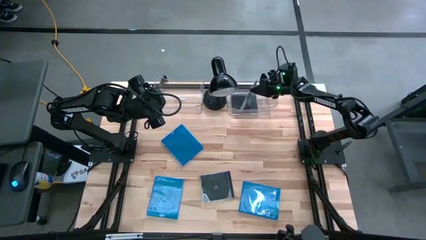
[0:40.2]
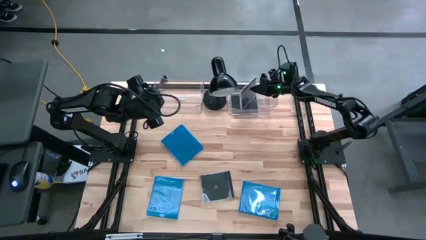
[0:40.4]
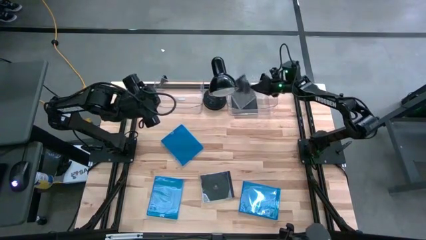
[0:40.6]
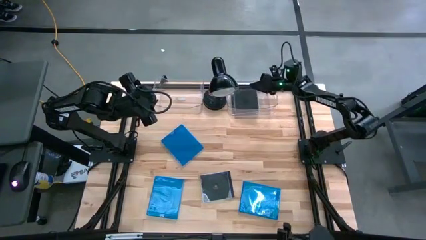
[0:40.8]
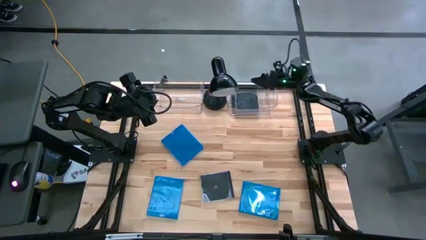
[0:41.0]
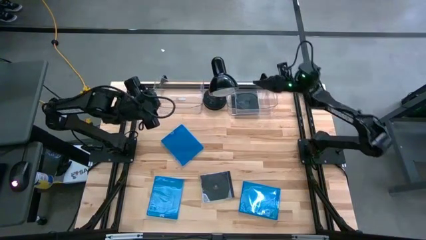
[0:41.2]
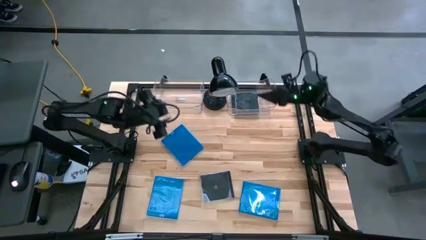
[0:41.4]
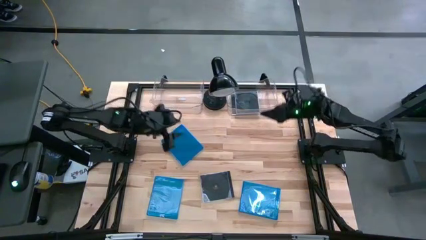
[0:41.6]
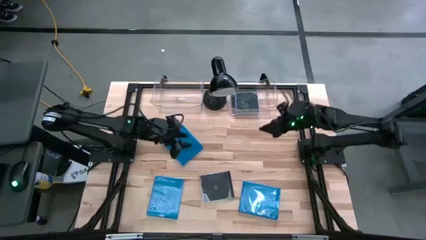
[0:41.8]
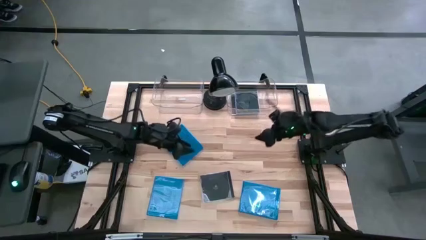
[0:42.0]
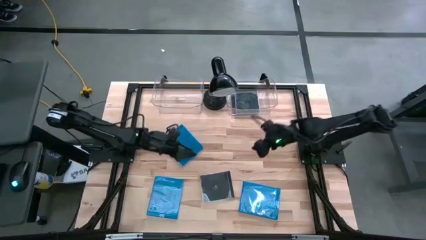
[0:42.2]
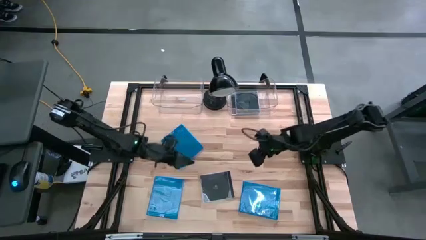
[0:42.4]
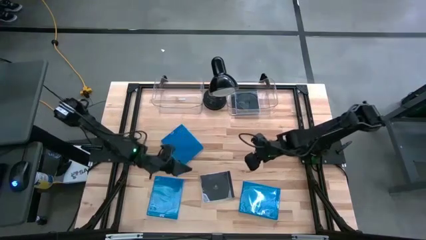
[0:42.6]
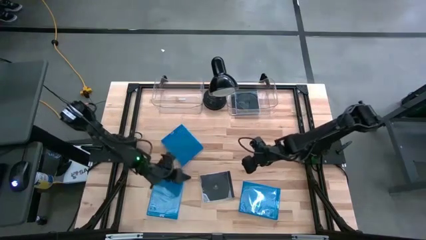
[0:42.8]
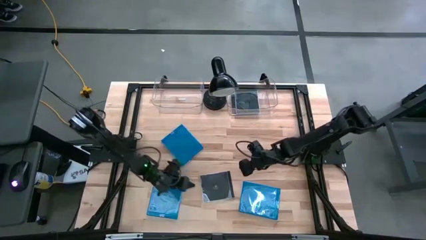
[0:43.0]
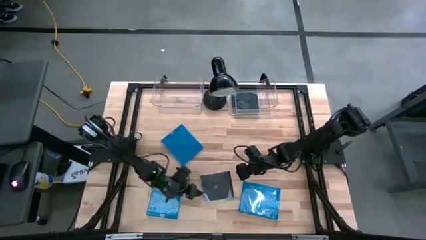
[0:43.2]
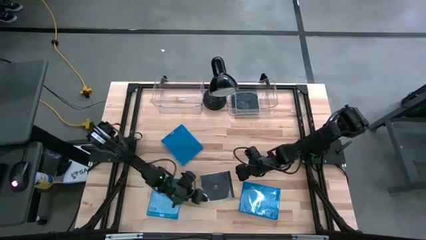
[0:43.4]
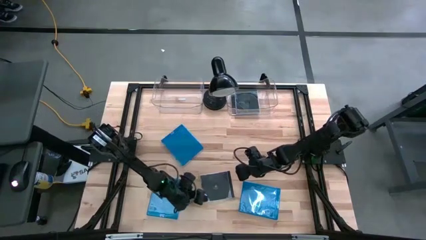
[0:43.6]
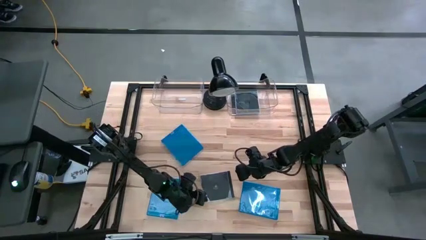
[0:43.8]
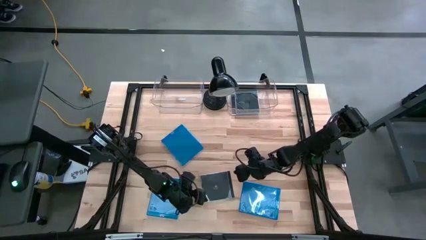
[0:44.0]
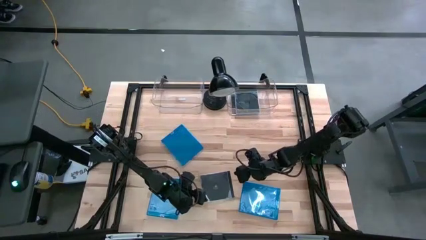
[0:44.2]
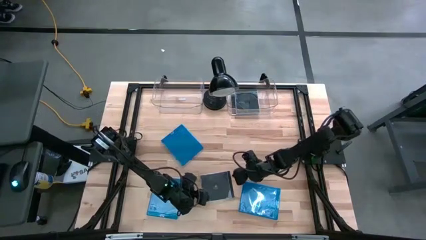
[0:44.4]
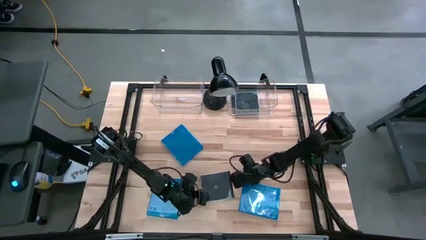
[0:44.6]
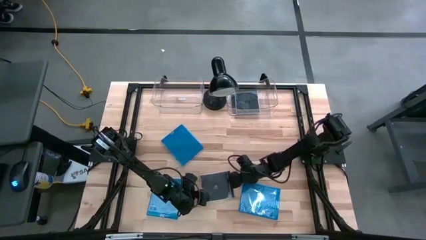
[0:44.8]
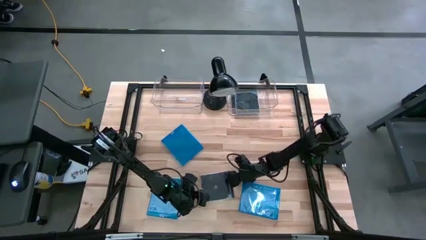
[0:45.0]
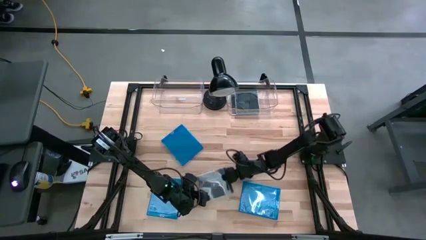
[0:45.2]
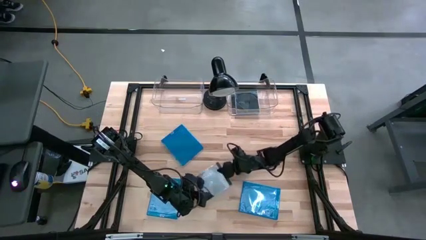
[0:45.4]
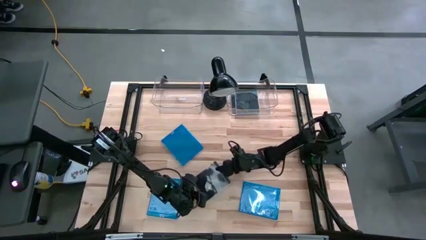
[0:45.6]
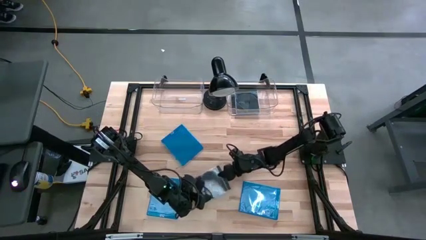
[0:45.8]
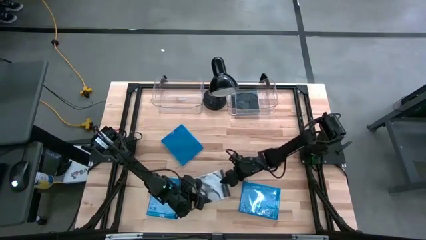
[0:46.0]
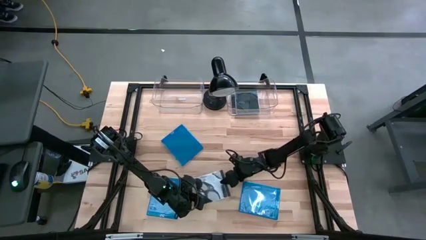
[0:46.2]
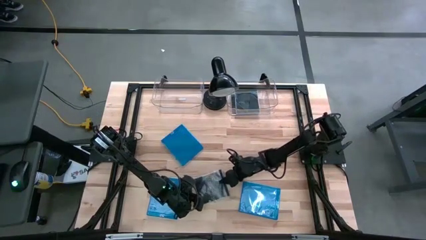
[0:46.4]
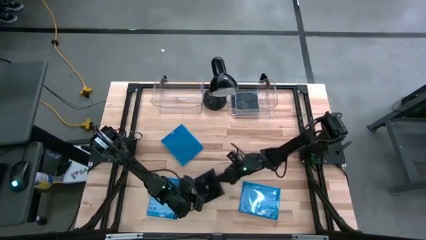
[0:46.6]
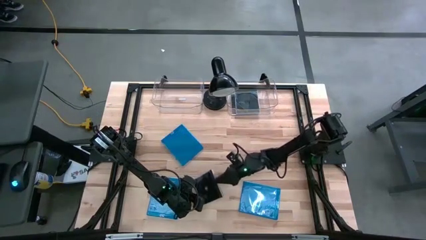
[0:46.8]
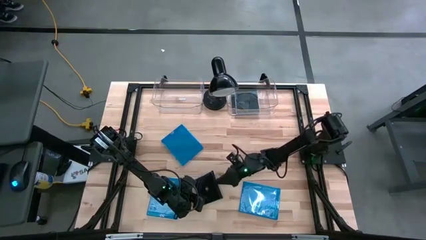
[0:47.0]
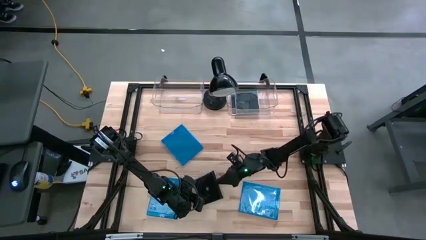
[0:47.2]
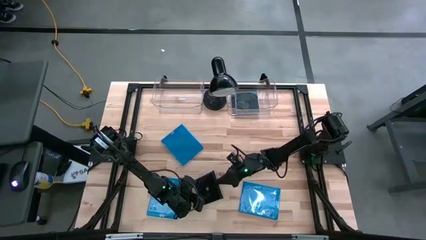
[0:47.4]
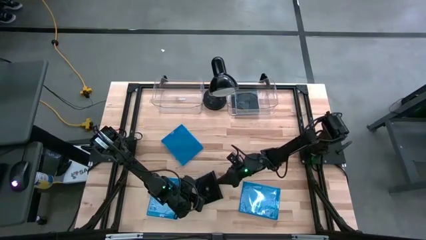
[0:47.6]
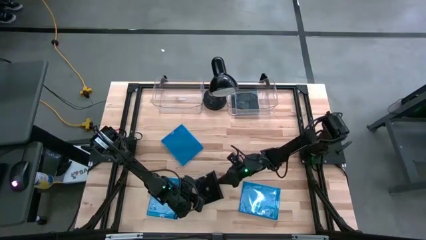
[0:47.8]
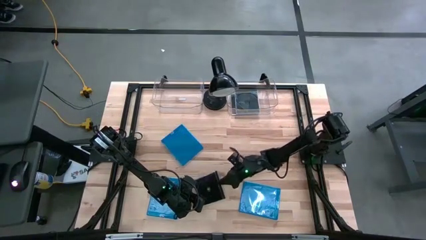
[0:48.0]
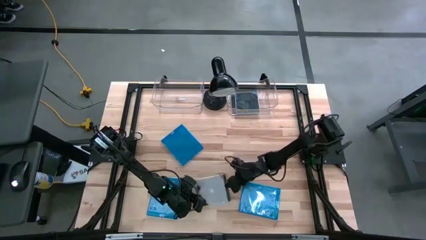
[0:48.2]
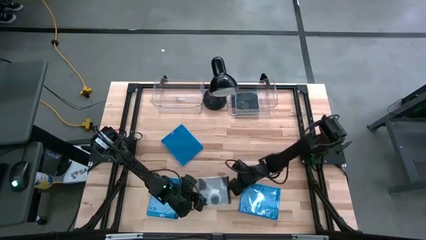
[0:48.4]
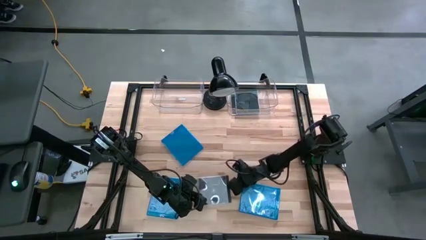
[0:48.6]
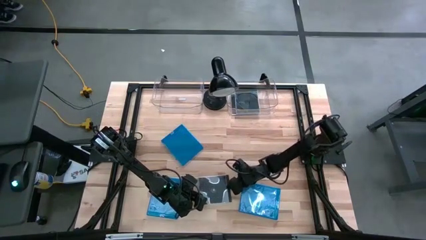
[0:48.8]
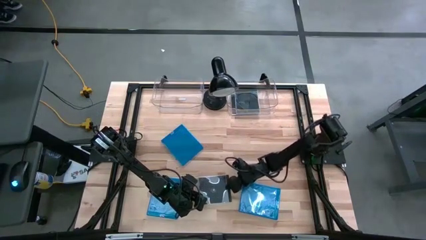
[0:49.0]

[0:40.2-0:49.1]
Task: Pick & place jewel cases by type
Put the black CD case into the right transparent bin

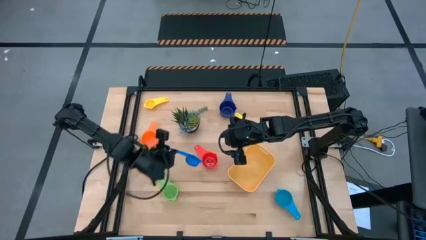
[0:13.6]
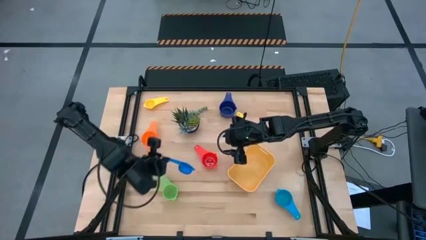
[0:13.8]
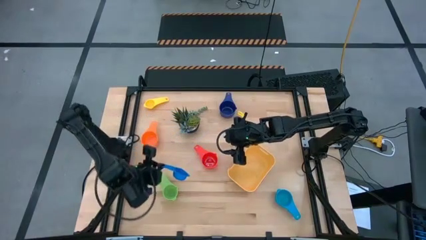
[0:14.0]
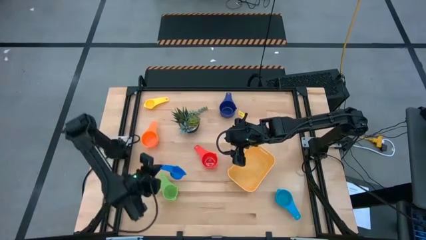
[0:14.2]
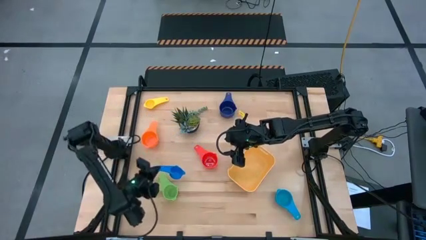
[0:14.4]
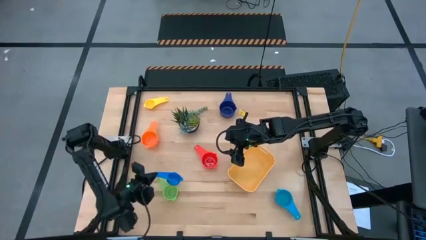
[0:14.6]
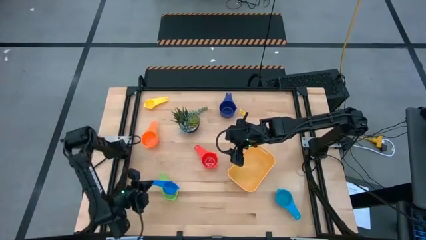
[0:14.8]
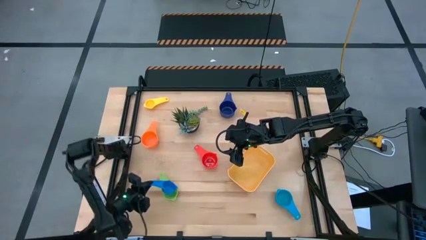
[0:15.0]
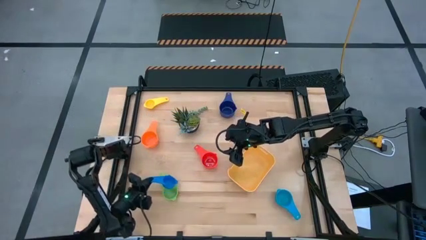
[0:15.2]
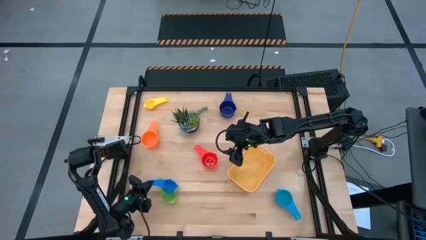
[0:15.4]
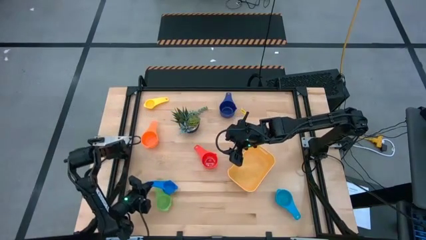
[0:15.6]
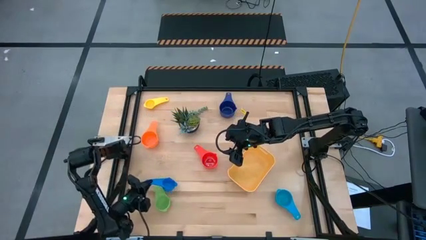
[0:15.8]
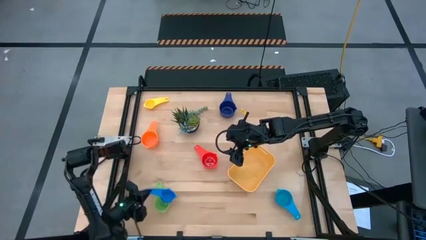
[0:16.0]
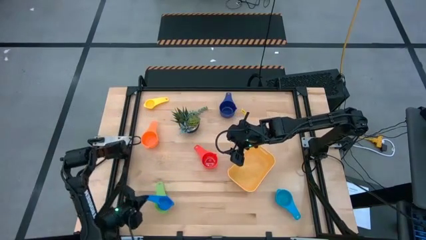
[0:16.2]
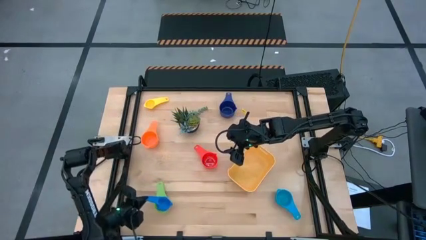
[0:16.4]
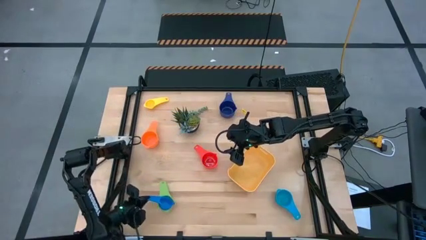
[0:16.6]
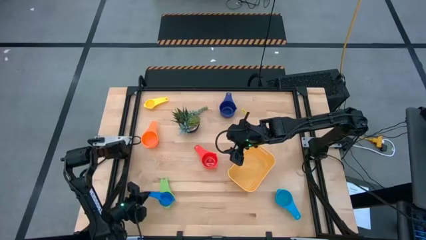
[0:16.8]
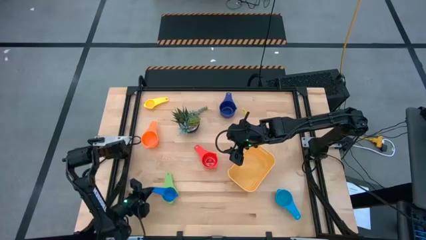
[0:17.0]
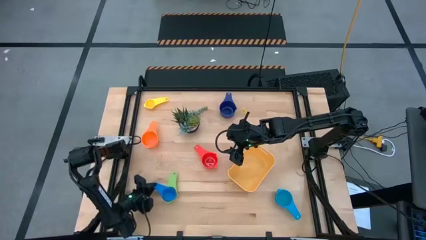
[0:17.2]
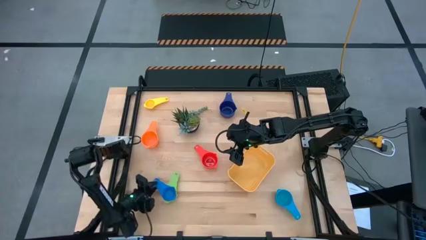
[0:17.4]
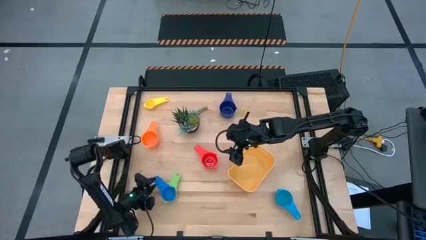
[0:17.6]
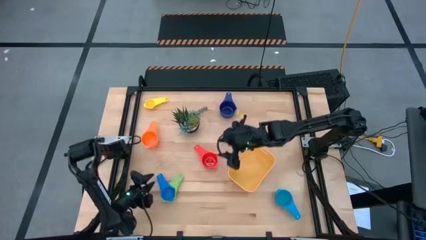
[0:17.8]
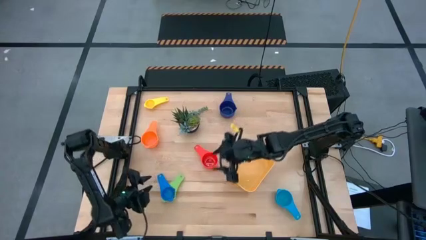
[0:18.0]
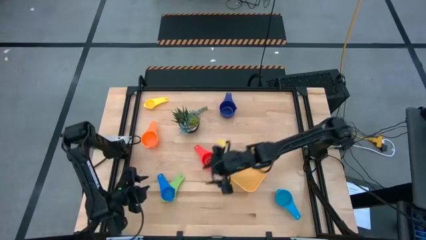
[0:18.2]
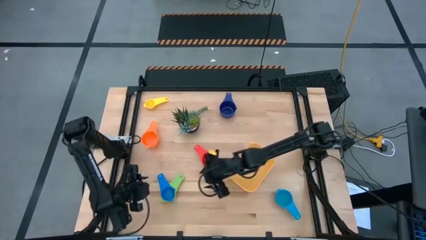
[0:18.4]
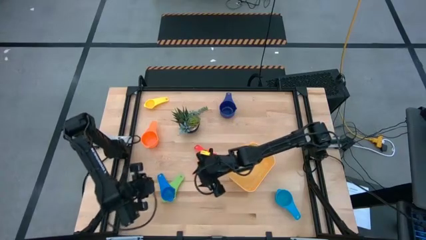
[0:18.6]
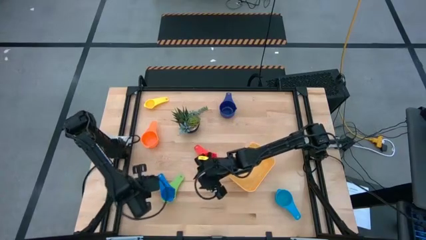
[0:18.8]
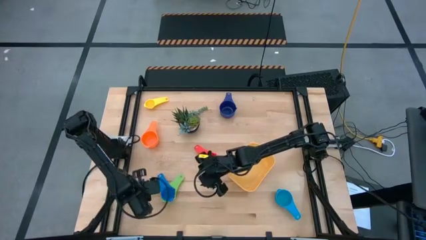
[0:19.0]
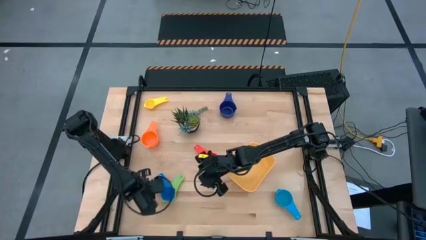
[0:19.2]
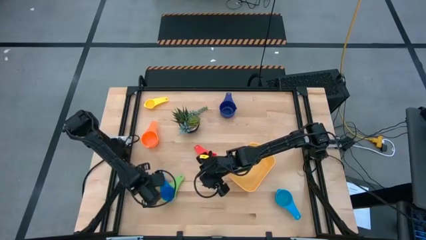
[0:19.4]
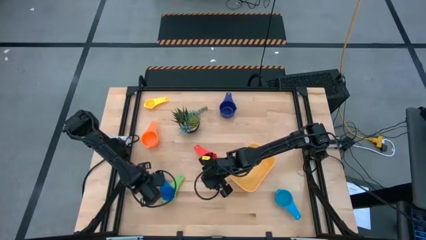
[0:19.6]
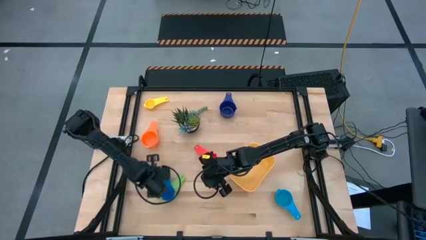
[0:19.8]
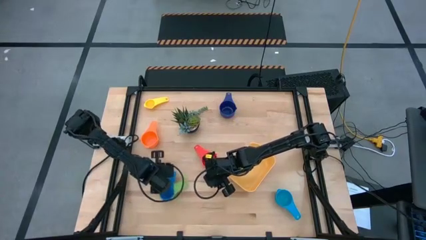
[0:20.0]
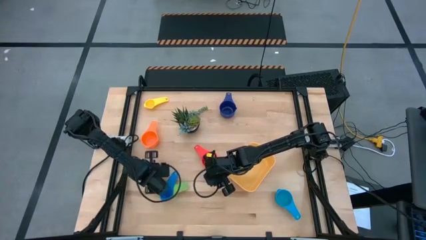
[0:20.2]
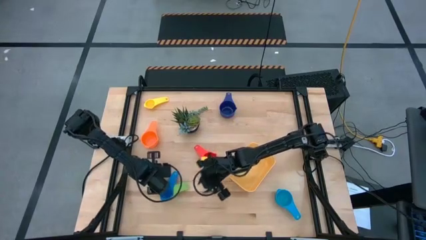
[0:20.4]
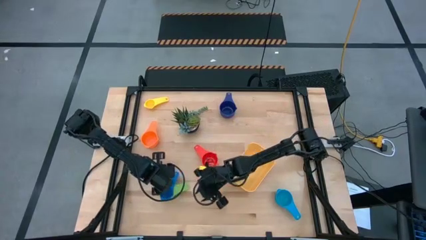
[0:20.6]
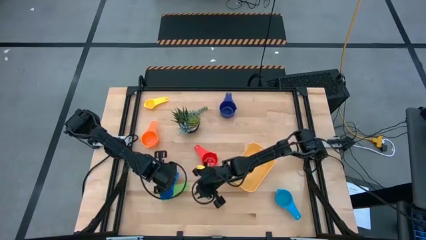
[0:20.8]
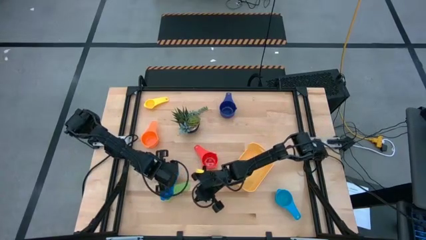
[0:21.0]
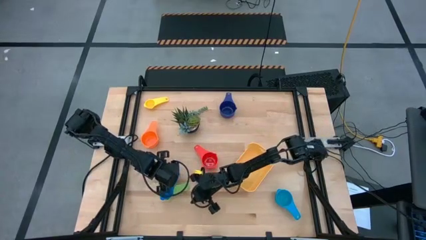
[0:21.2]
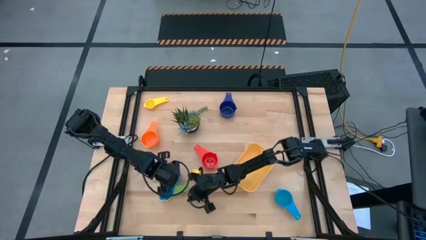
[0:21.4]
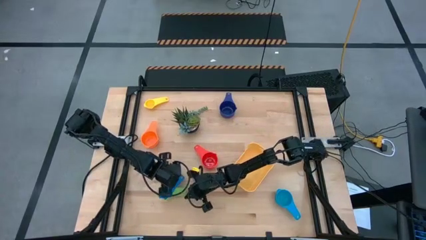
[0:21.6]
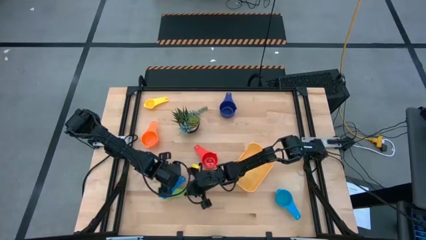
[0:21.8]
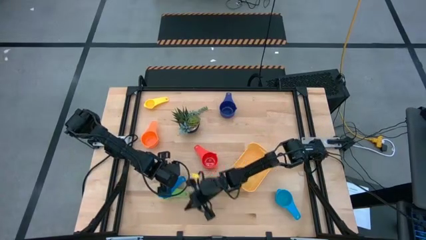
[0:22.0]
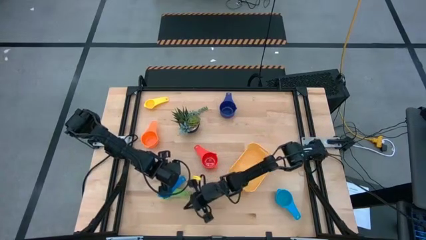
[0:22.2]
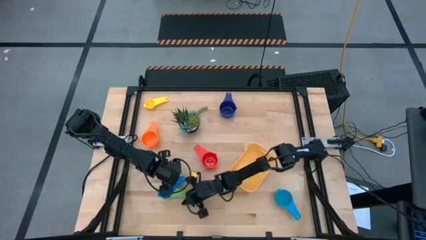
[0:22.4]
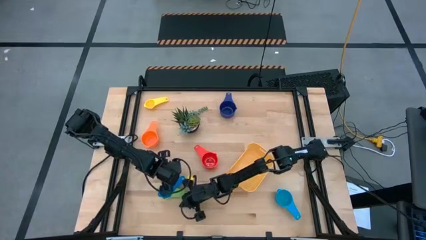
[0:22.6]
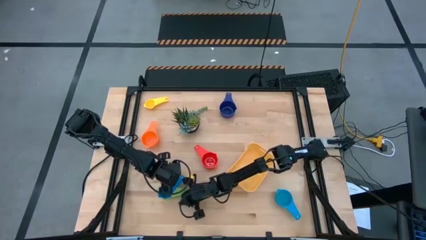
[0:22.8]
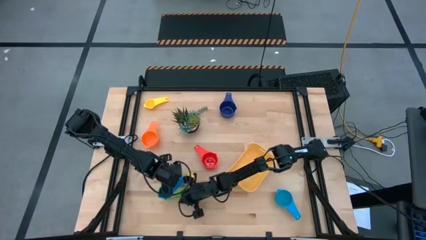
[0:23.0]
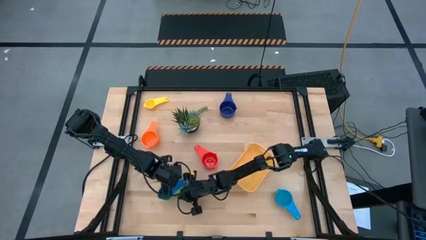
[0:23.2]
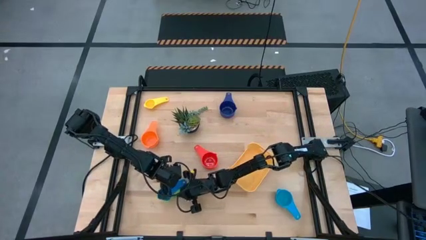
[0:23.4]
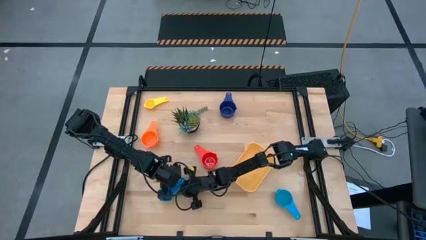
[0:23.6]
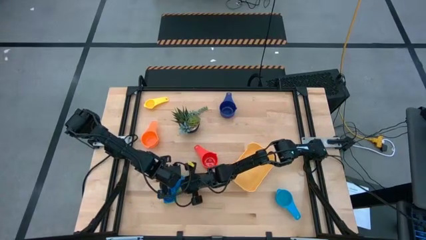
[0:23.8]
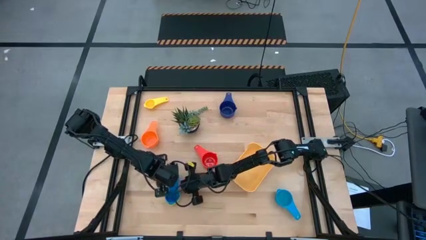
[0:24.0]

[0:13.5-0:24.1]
Task: Nest measuring cups in basket
Stack the blue measuring cup on the green measuring cup
